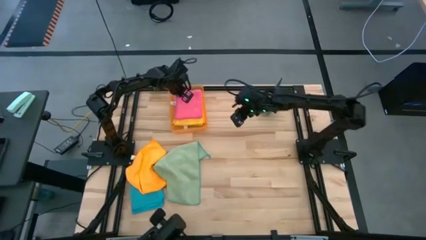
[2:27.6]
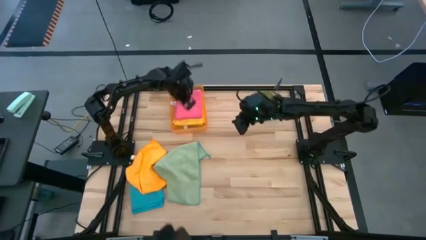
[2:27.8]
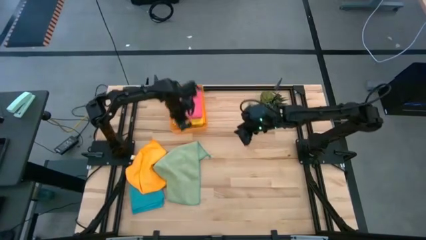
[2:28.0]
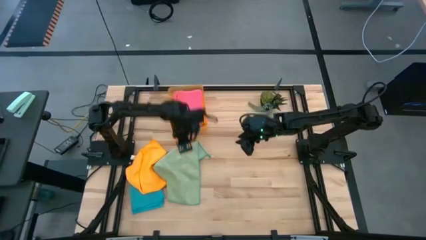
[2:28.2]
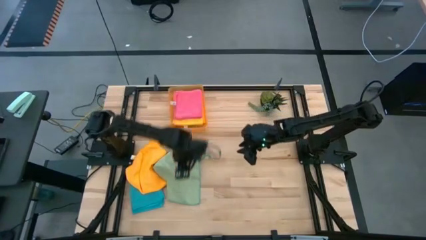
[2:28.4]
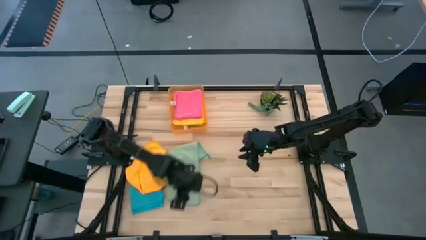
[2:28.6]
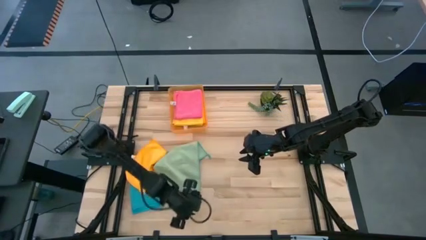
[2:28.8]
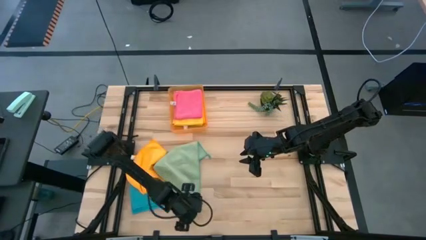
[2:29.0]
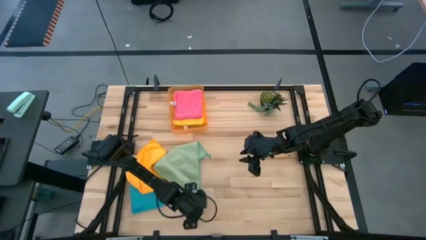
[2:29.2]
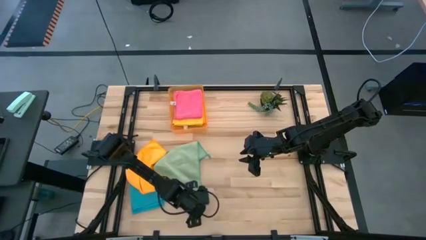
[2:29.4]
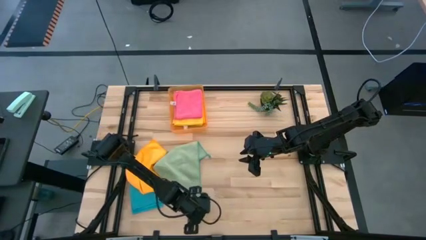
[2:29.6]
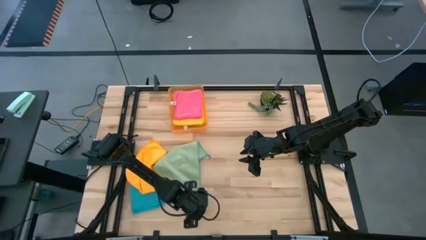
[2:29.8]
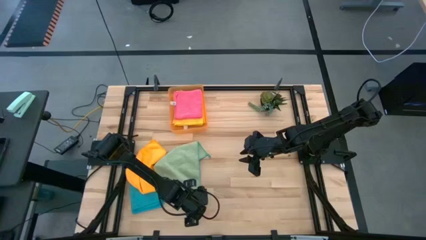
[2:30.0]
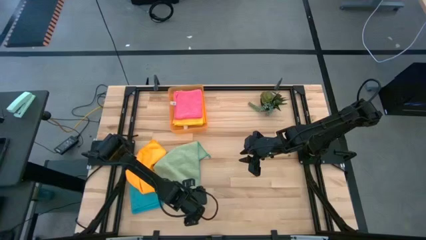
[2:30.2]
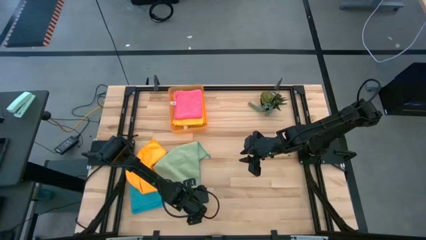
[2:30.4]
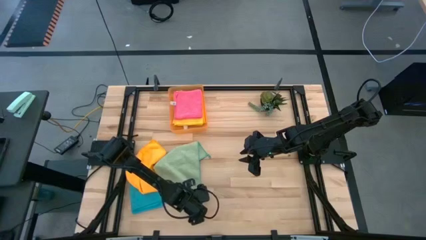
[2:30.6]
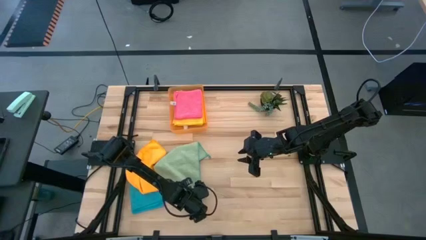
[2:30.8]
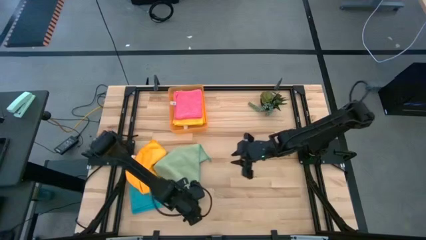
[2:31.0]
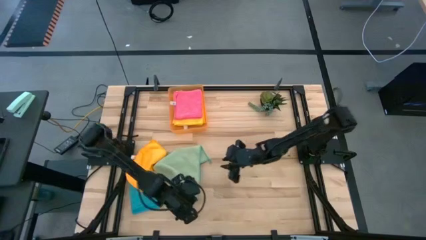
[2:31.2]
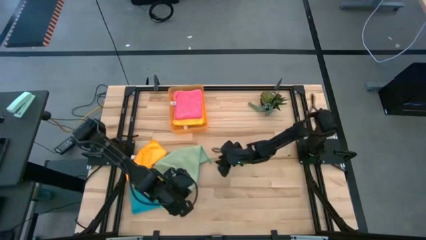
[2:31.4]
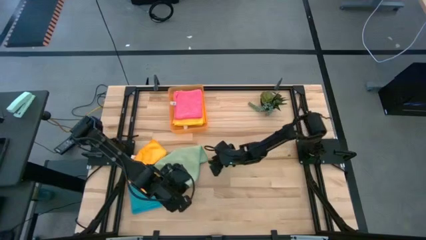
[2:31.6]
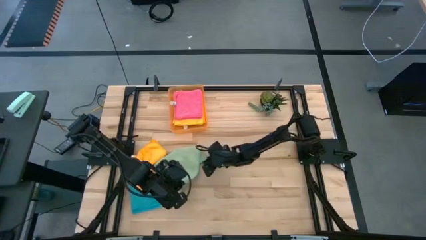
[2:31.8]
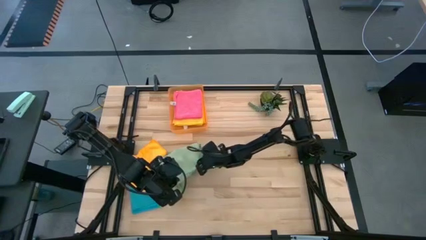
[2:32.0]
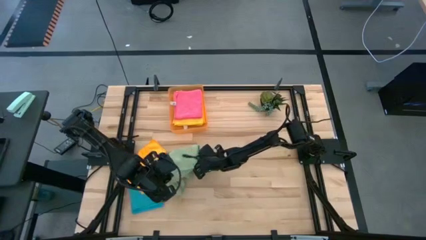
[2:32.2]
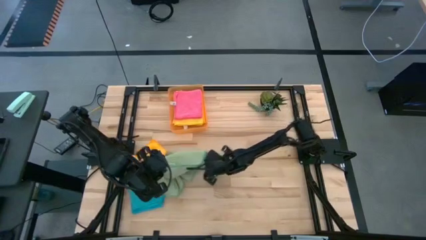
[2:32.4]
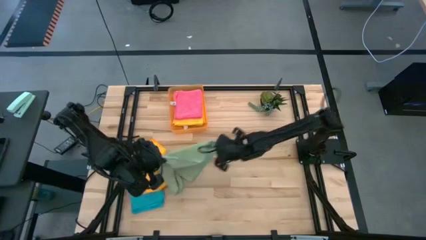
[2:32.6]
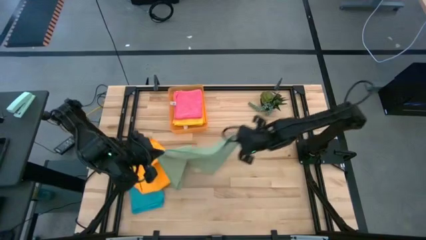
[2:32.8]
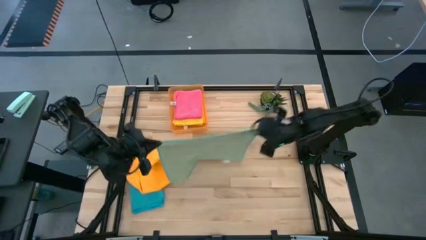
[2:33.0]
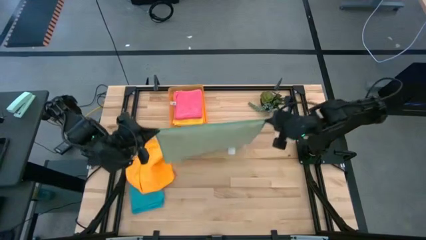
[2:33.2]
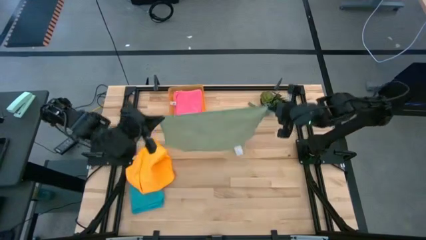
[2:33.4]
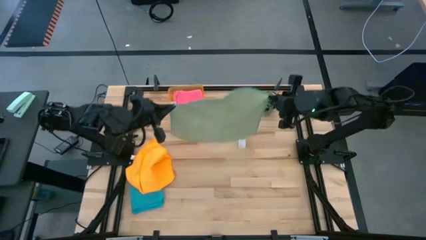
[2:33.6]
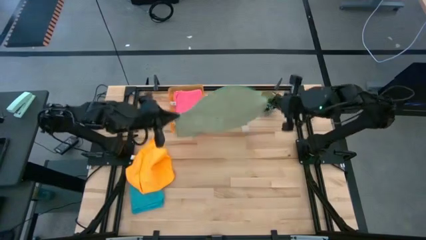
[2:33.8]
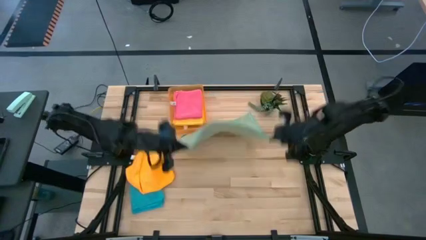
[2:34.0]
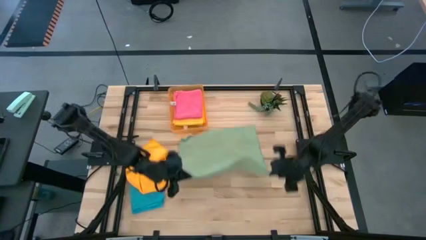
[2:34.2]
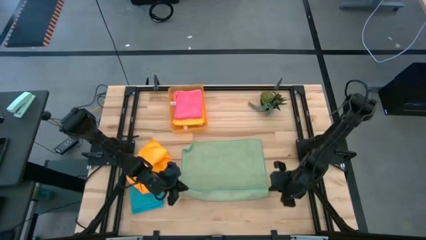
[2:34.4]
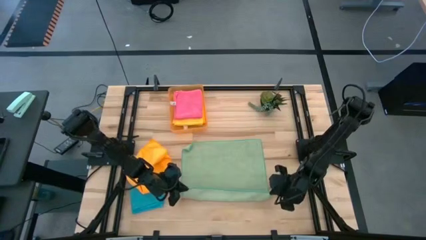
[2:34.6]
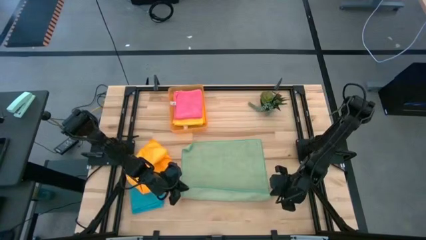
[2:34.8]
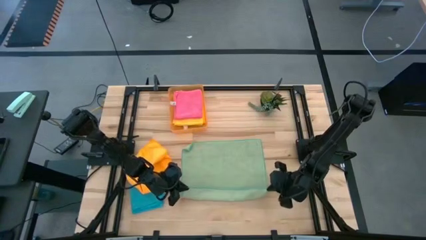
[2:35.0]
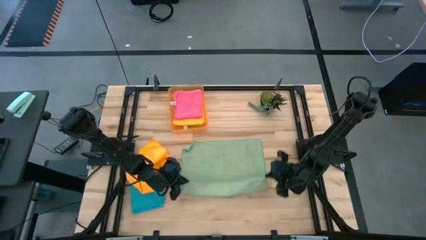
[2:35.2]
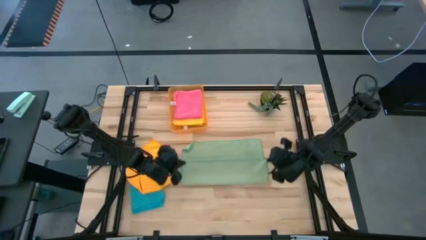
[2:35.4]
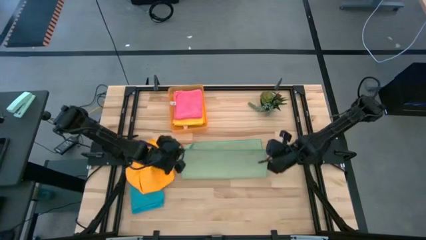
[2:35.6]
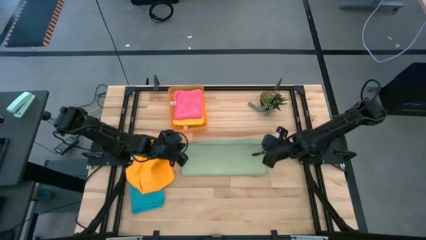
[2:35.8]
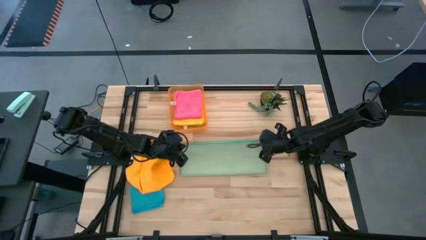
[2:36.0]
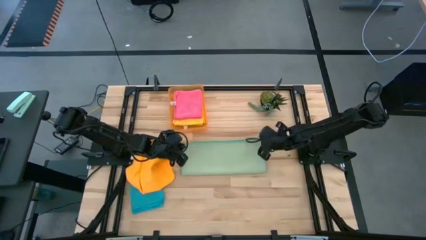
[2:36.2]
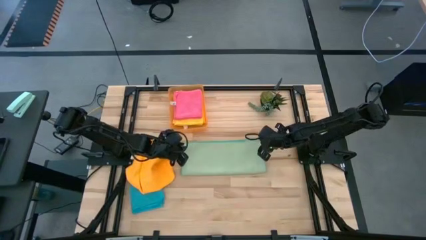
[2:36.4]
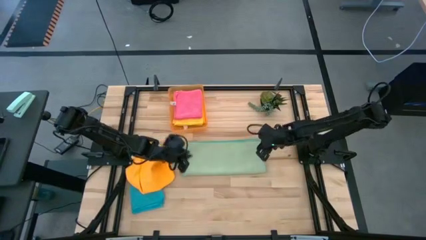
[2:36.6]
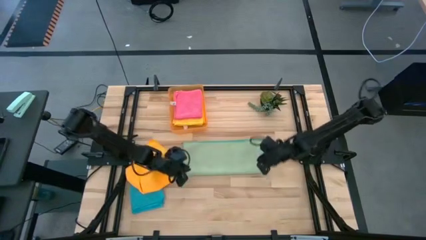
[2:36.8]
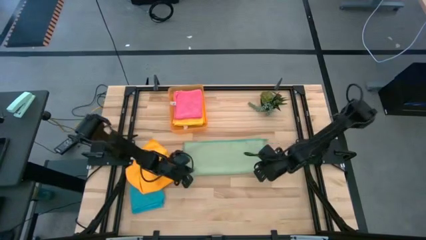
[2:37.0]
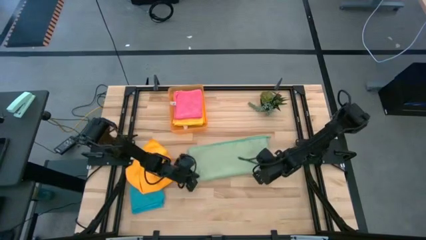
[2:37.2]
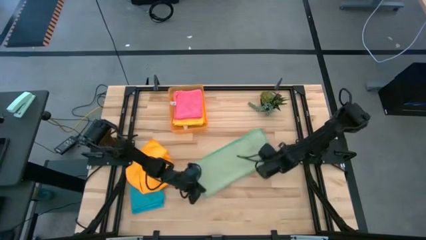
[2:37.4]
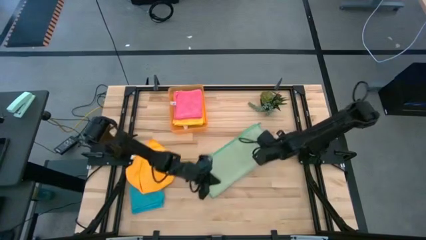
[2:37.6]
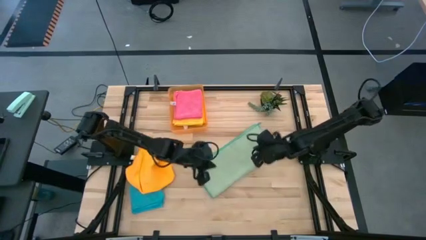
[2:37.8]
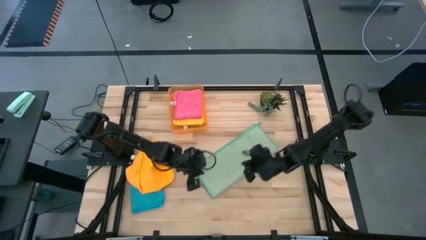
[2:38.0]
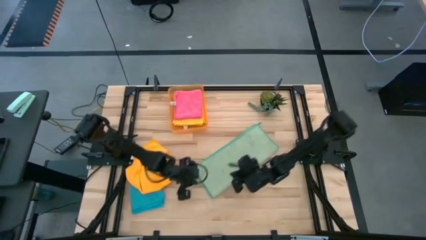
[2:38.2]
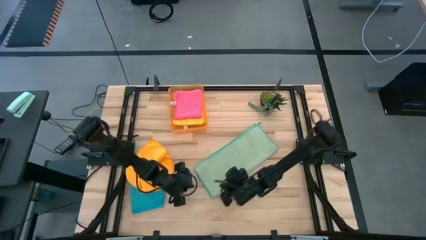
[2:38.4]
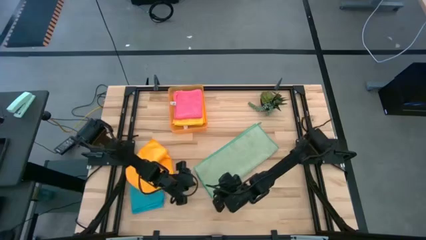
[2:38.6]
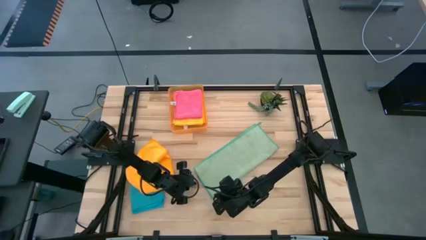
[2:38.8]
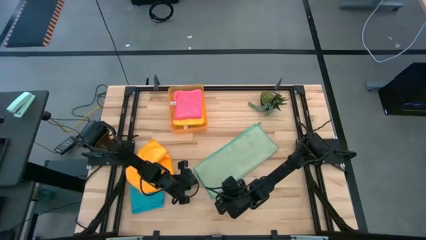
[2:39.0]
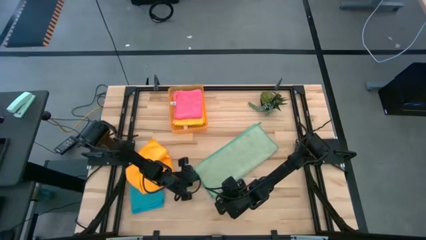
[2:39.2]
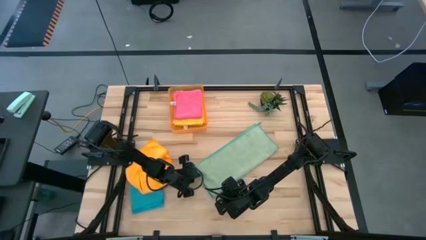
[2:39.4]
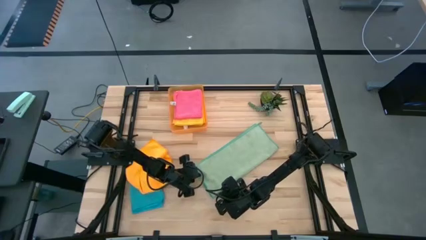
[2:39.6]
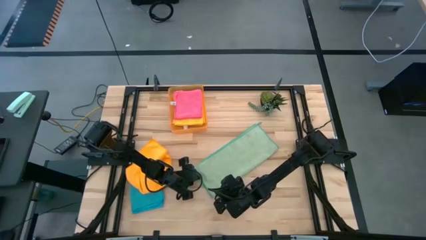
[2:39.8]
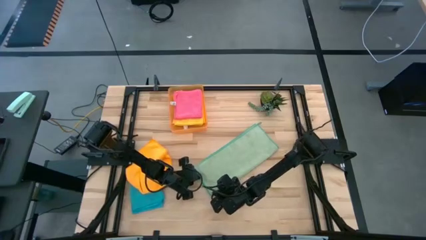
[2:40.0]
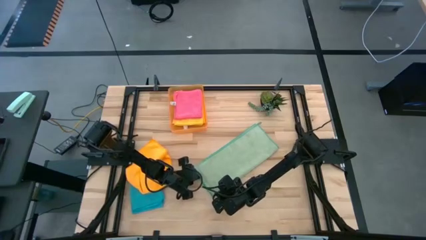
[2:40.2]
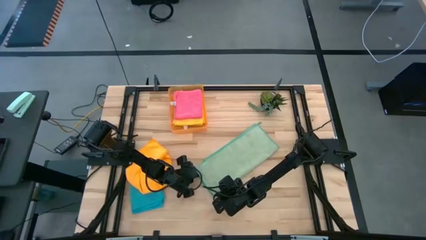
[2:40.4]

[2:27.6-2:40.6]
Task: Fold microfiber towels
Fold the green microfiber cloth
